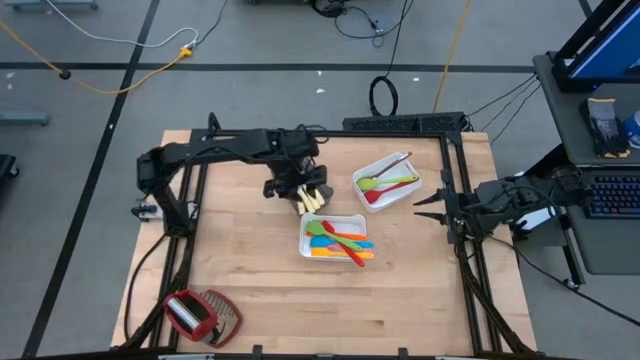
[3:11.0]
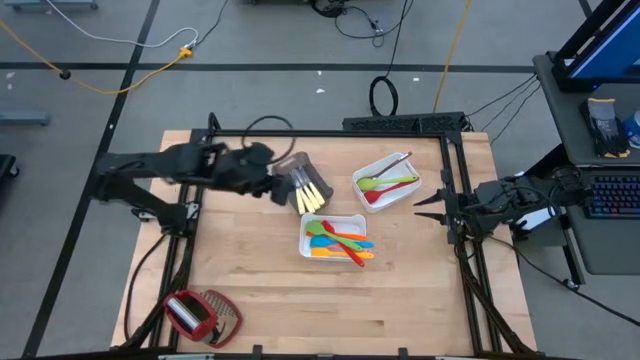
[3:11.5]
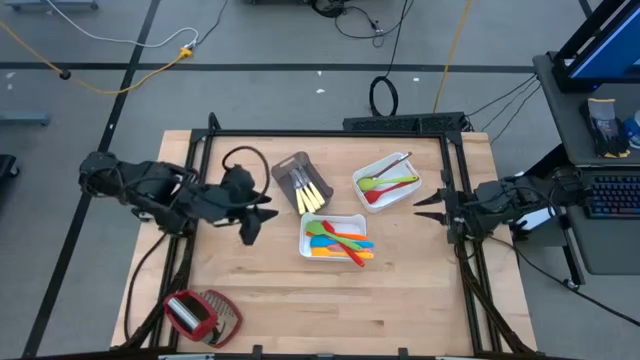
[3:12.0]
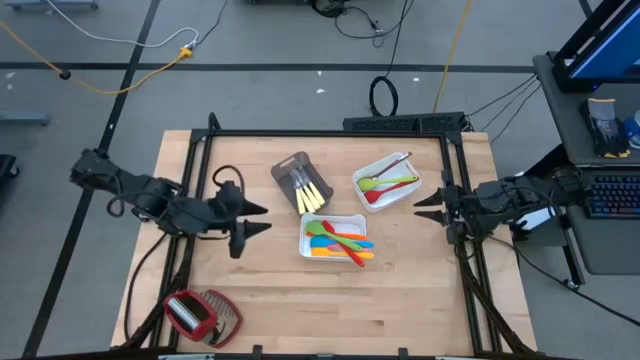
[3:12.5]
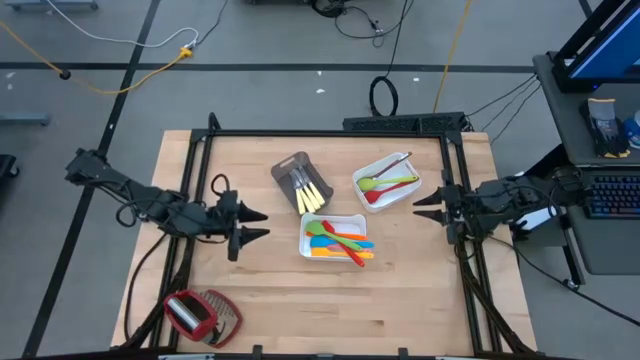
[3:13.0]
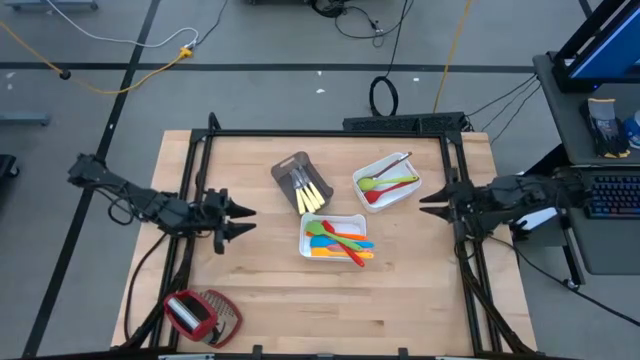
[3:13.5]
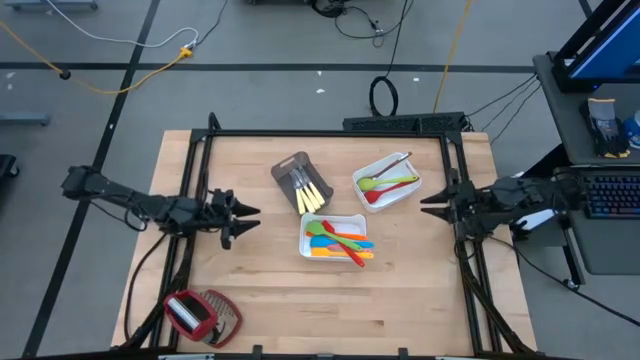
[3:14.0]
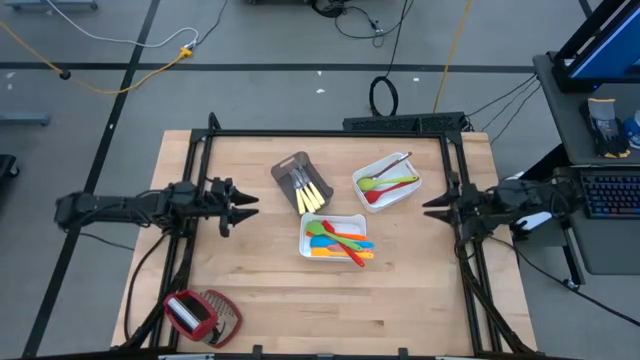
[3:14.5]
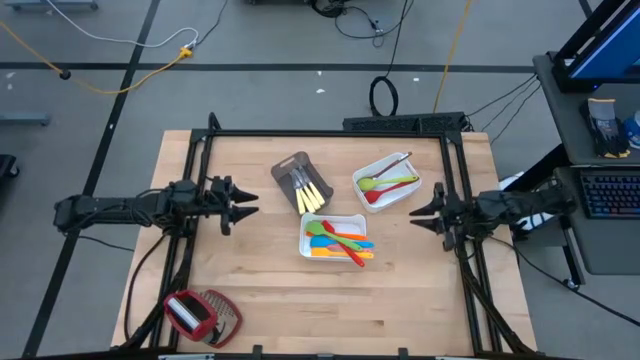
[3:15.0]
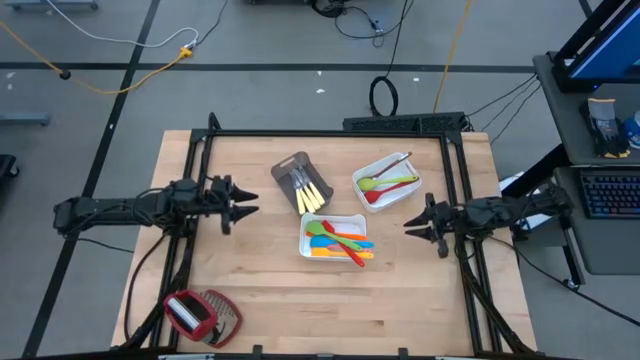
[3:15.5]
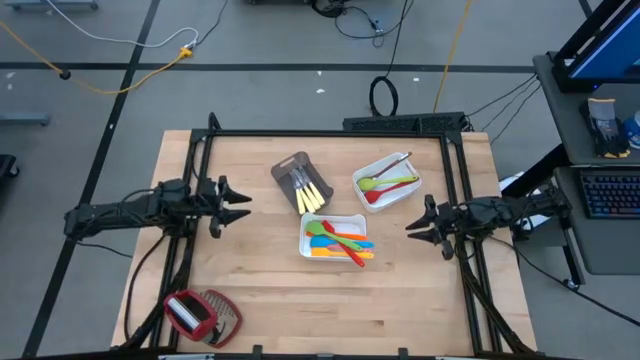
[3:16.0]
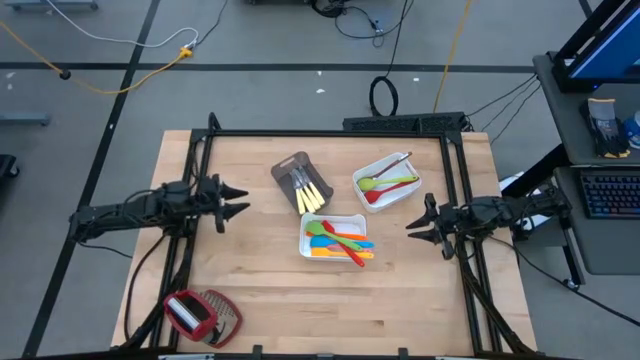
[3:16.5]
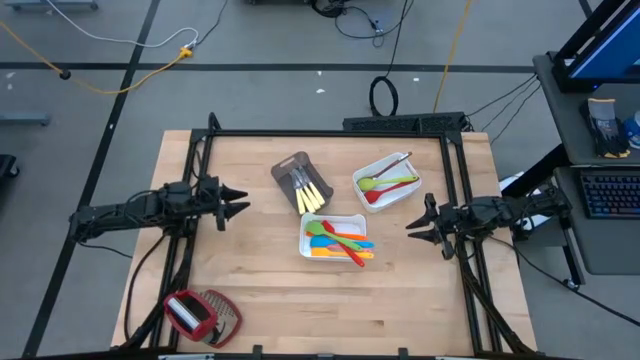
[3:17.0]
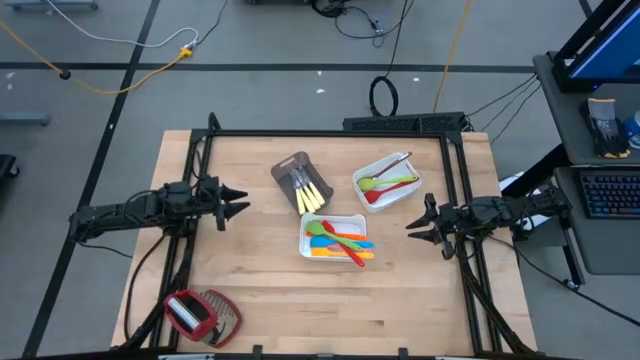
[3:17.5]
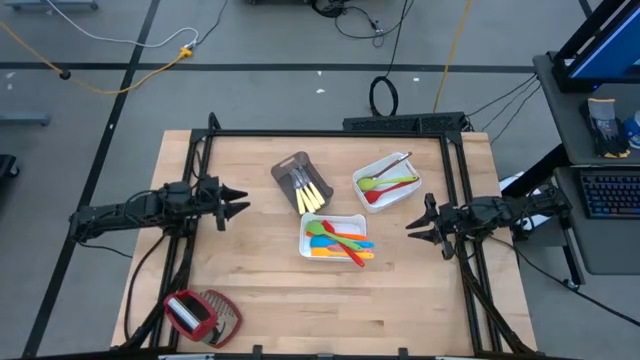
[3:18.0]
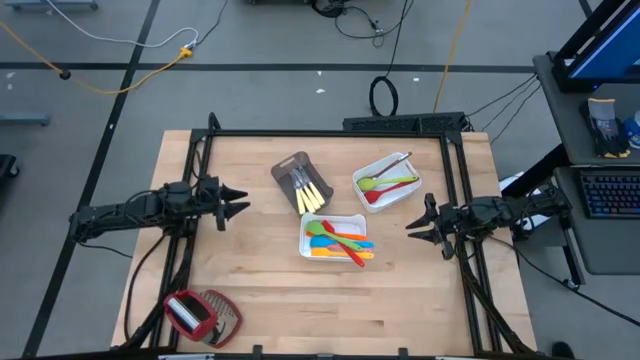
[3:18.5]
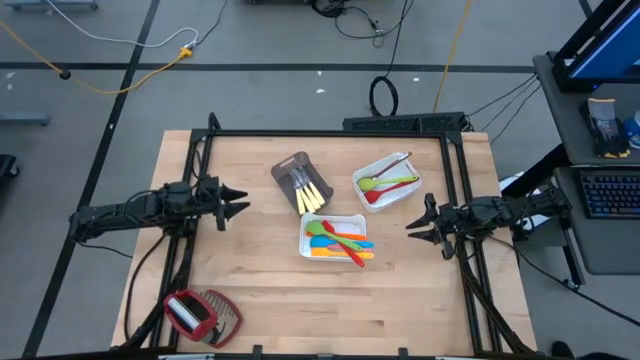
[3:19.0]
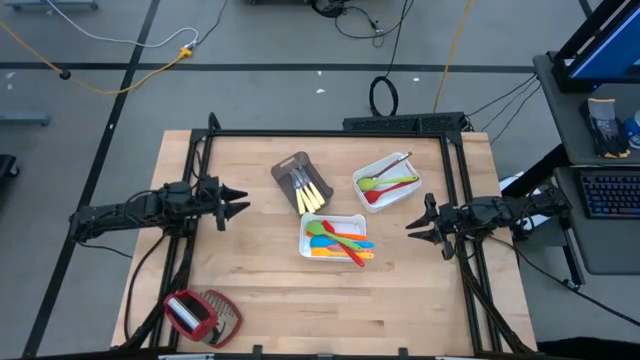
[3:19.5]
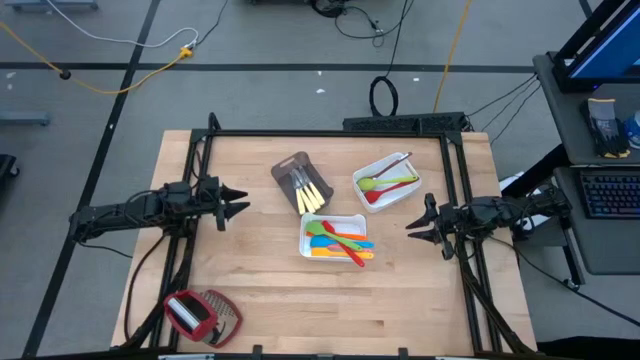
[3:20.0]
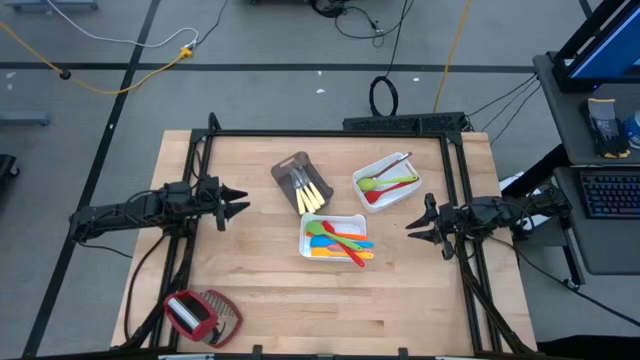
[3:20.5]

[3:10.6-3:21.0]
Task: Pick & Place Kitchen Items
Return to Home position

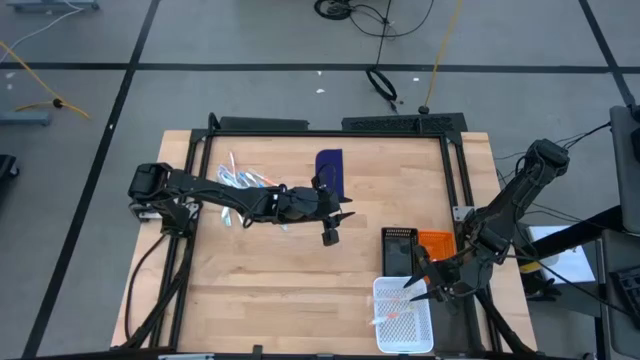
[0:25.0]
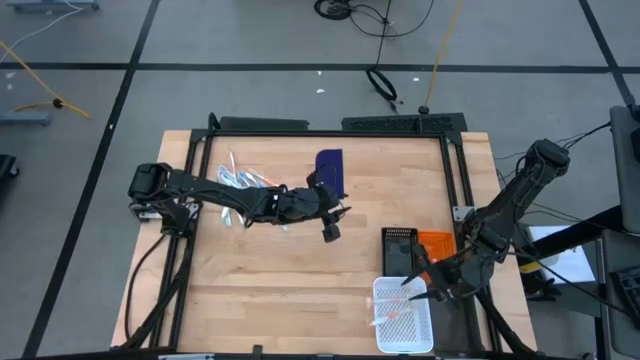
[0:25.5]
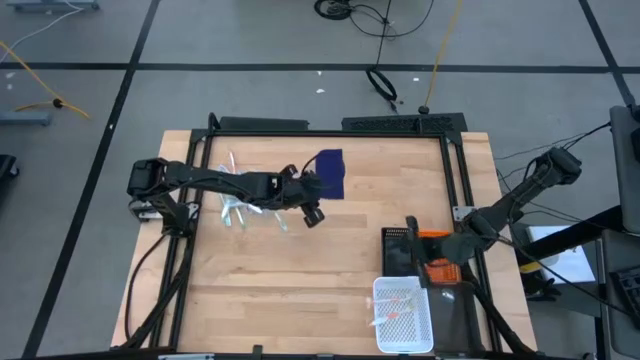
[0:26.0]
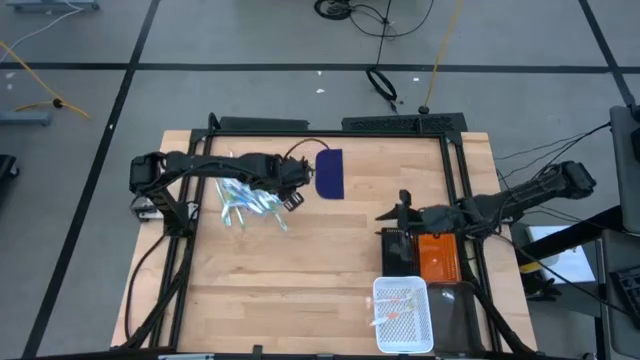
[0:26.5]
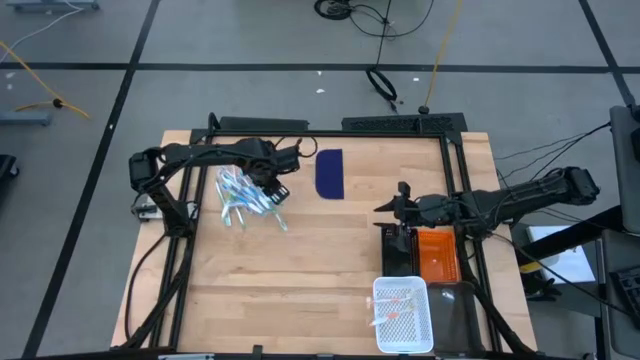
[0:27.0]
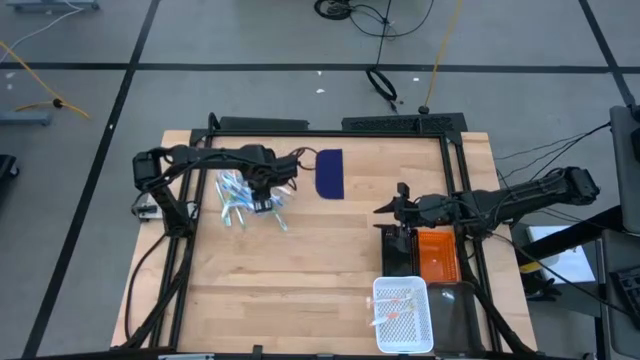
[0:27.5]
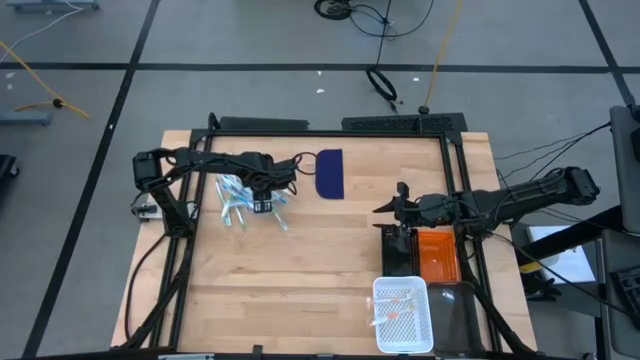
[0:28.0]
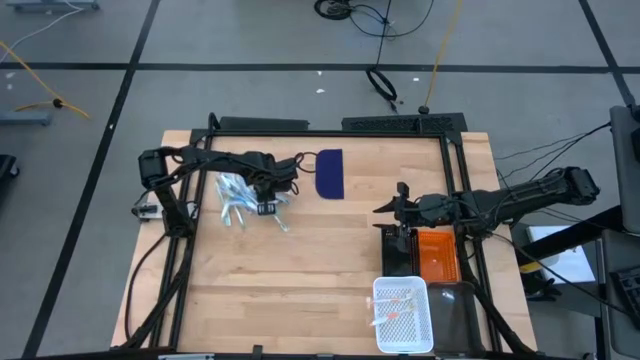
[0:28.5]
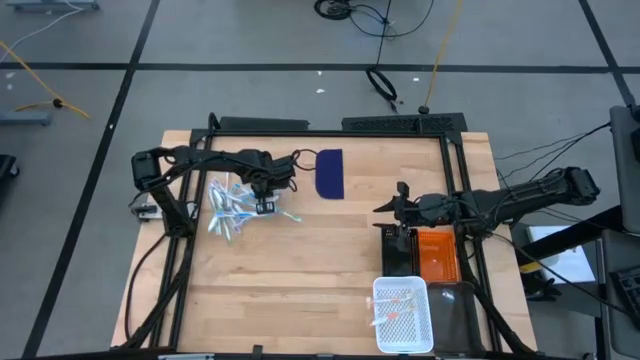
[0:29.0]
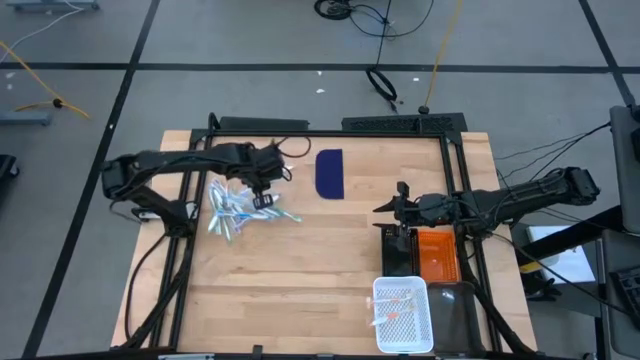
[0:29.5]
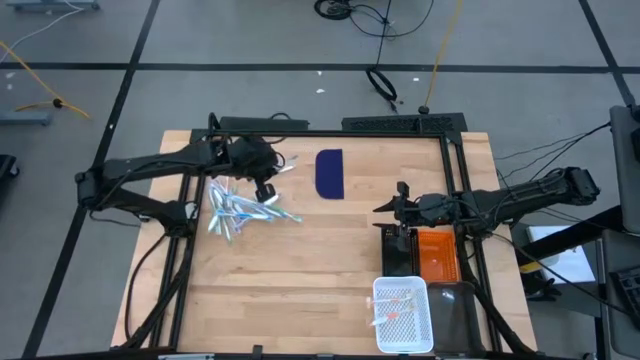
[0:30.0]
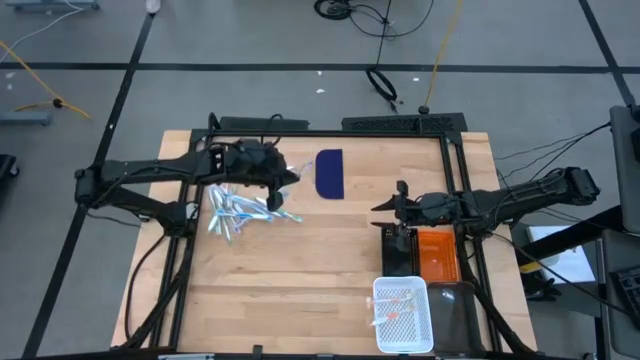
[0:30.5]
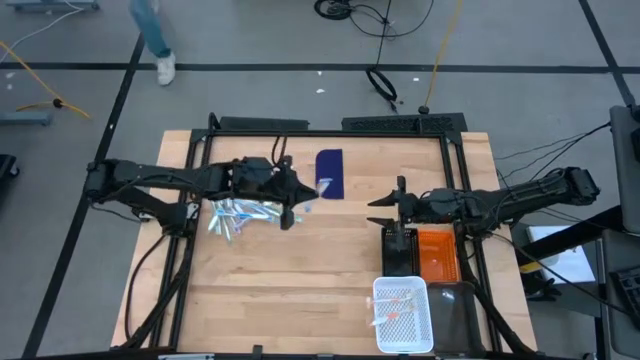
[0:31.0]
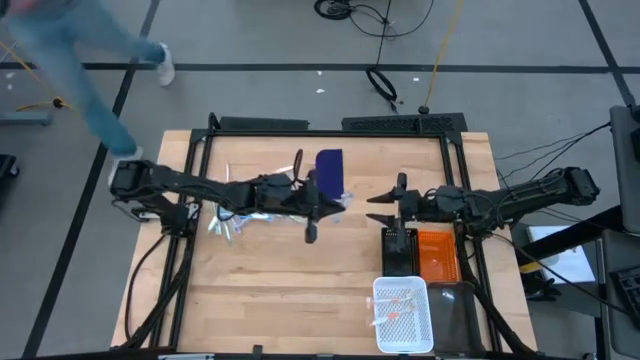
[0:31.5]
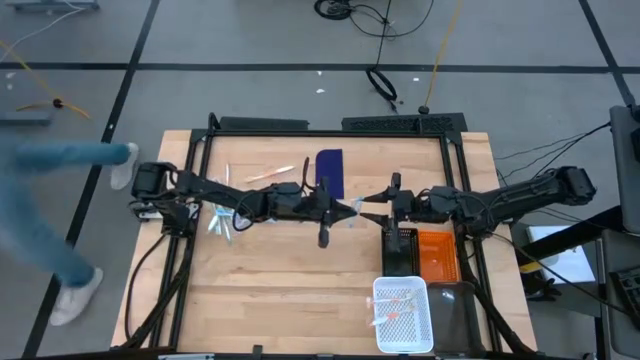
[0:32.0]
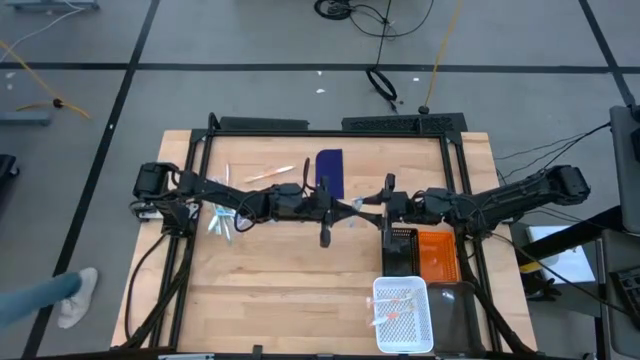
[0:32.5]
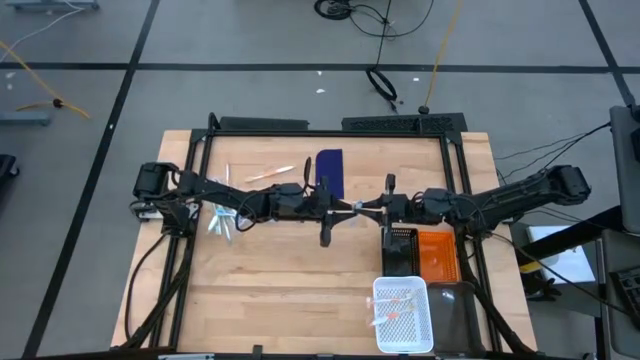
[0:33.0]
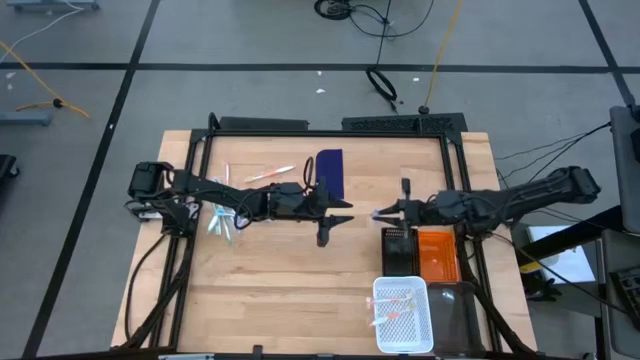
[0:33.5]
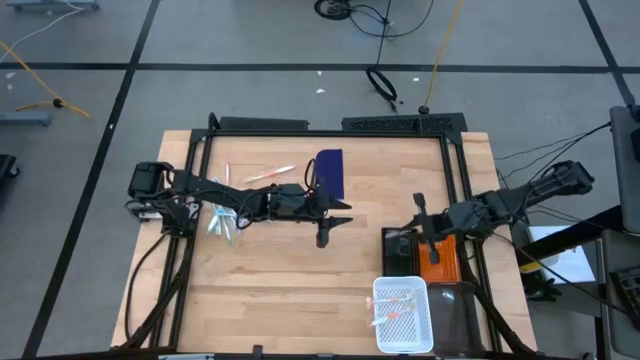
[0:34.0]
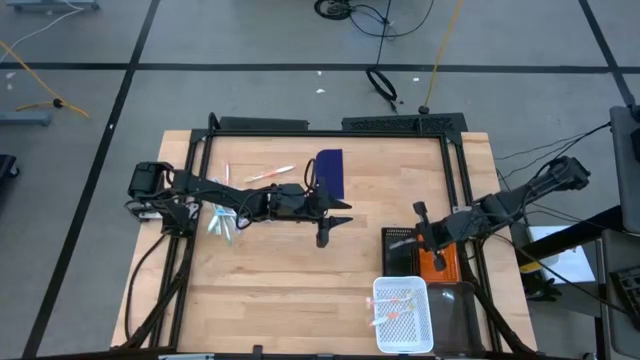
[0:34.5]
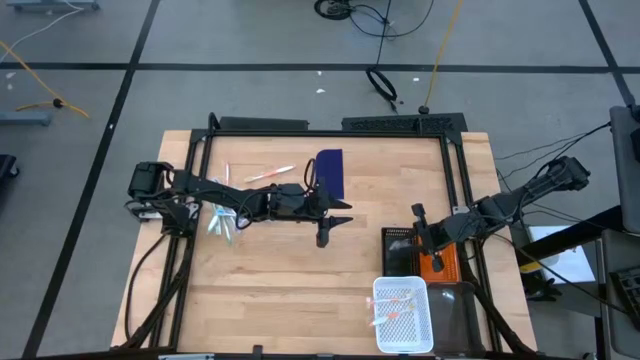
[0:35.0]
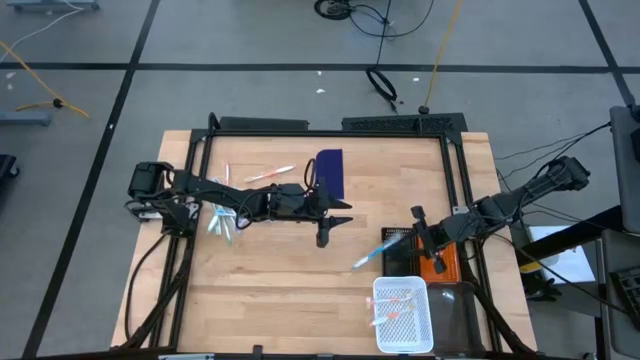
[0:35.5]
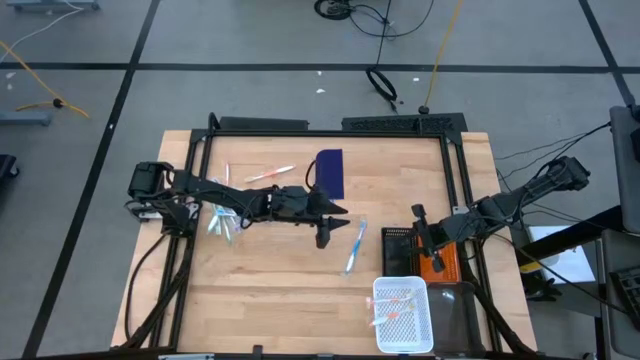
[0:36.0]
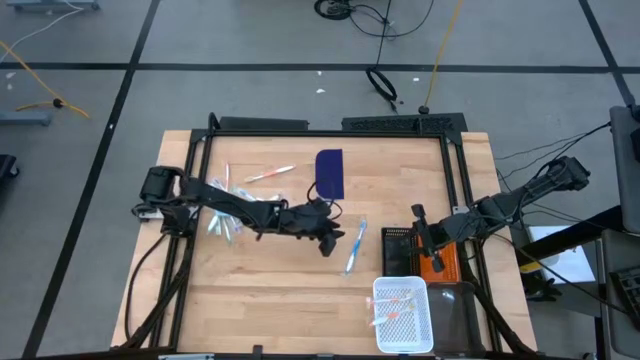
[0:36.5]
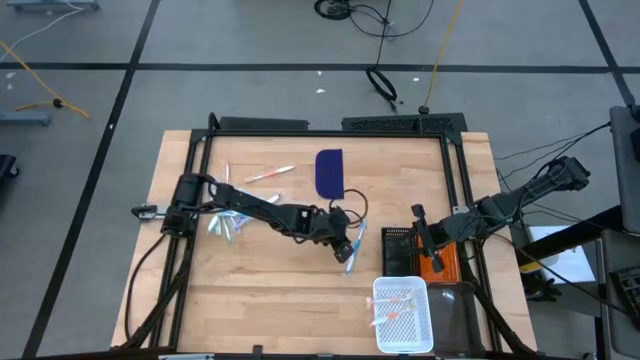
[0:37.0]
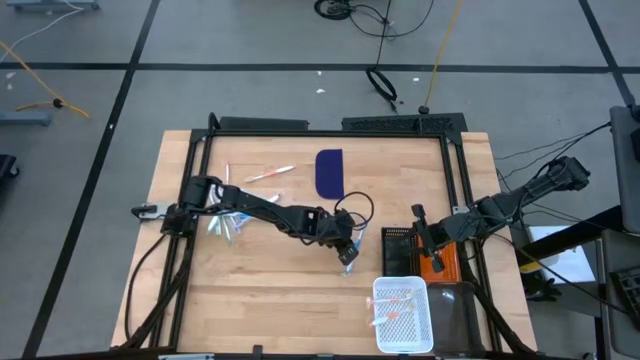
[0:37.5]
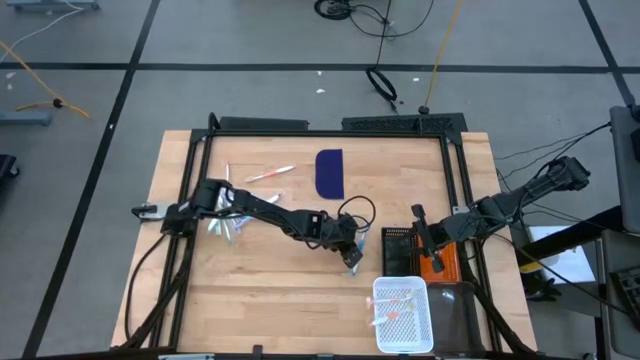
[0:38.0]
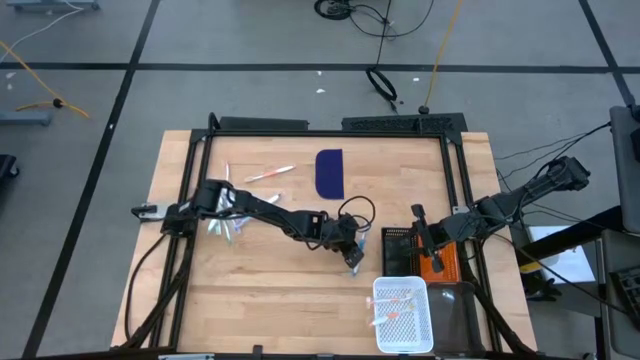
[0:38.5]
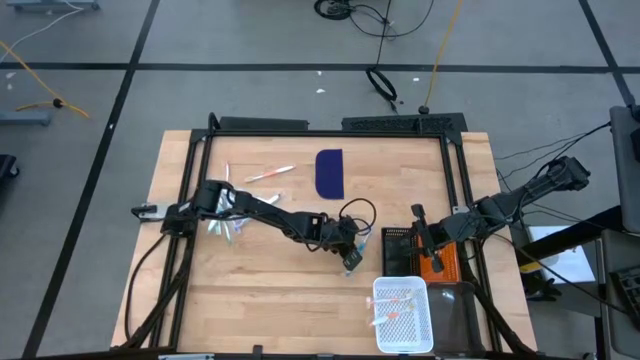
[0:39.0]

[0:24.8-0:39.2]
Task: Pick & Place Toothbrushes
Put the blue toothbrush into the black basket
